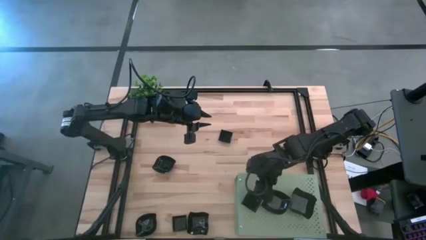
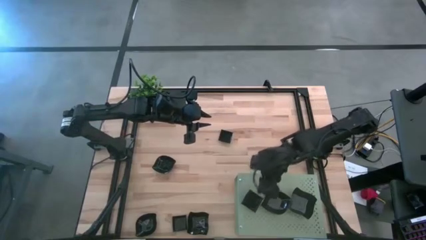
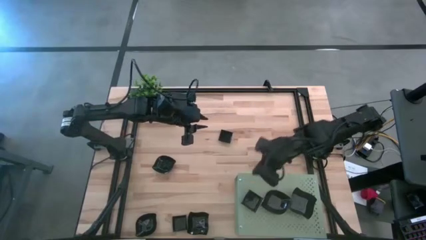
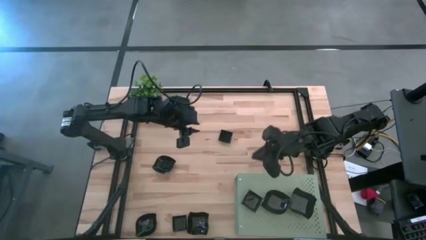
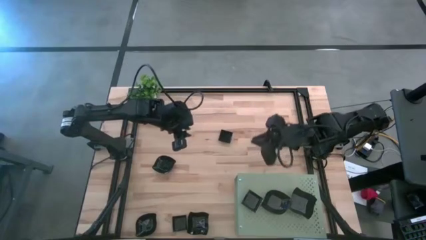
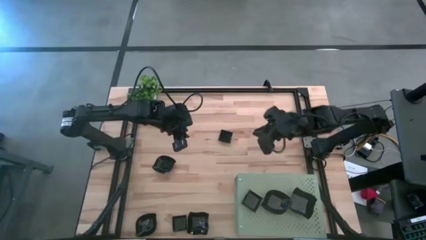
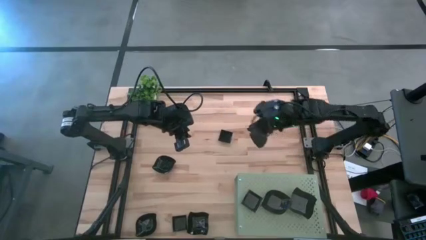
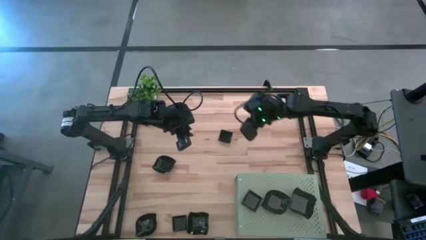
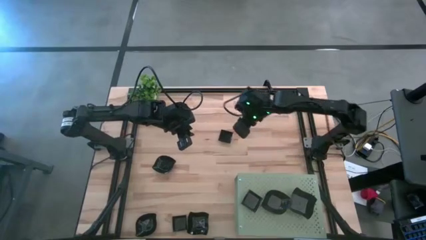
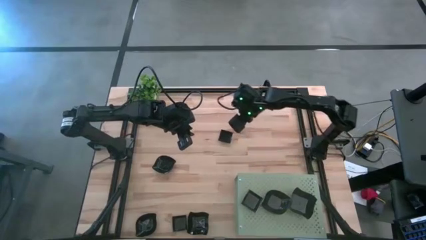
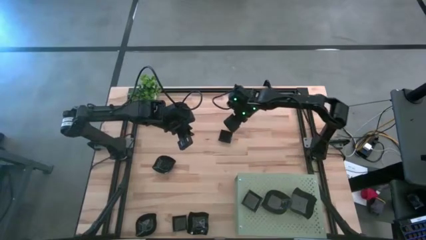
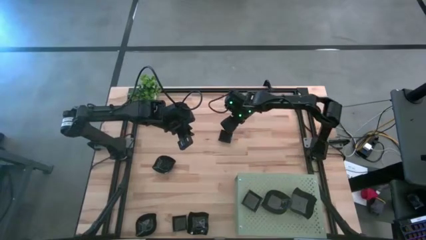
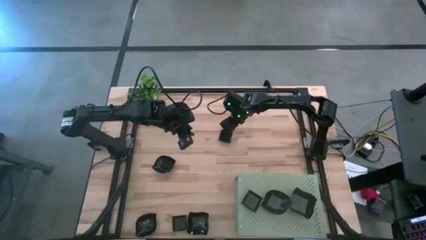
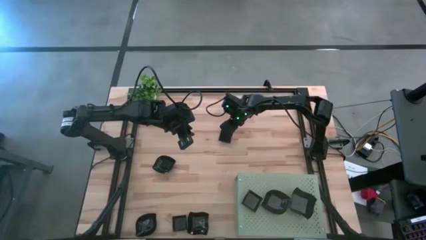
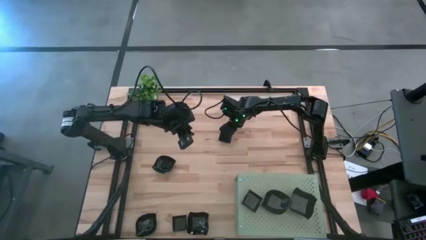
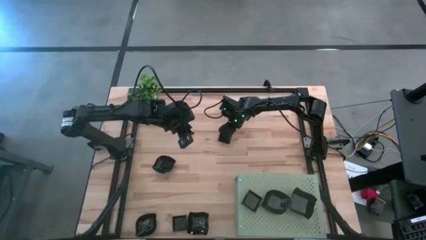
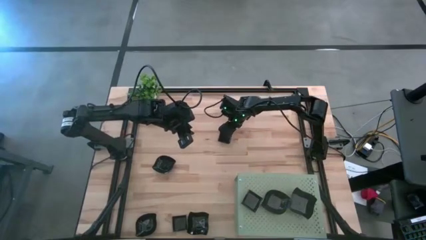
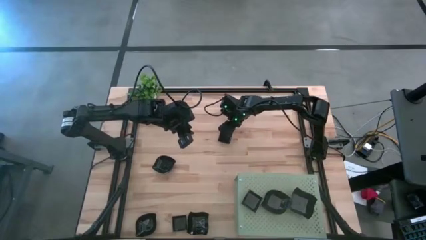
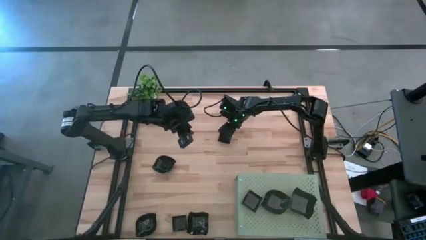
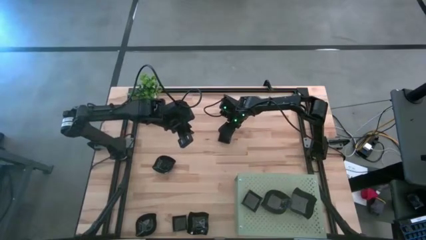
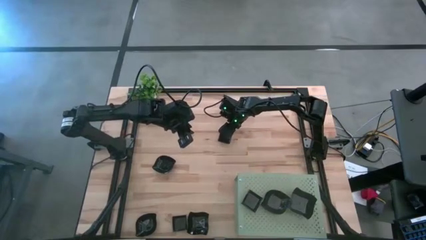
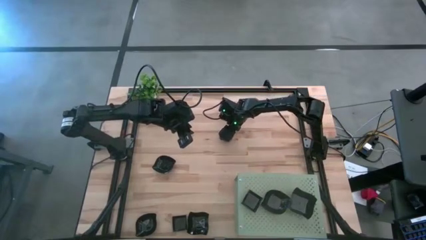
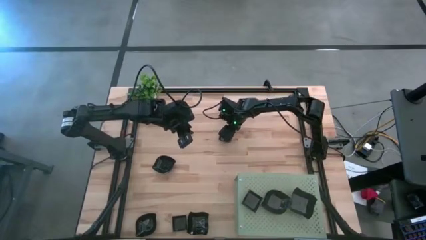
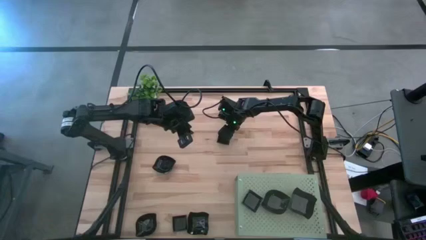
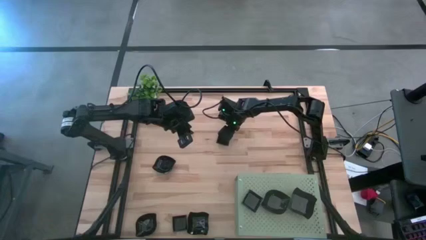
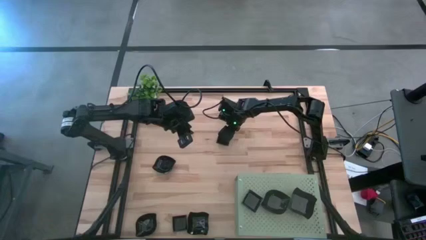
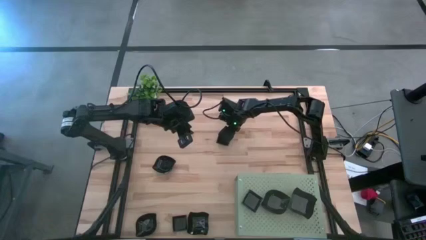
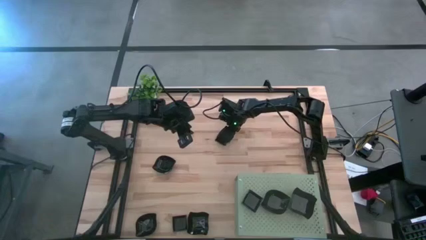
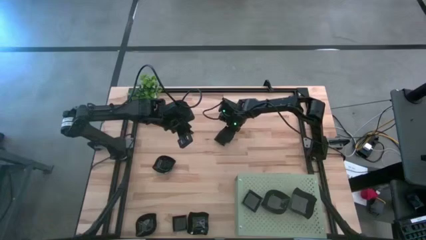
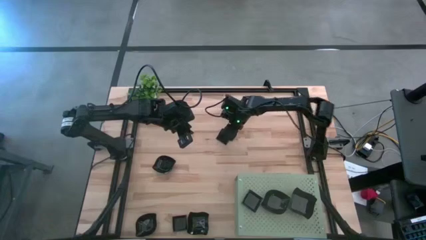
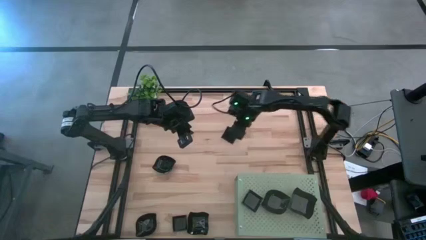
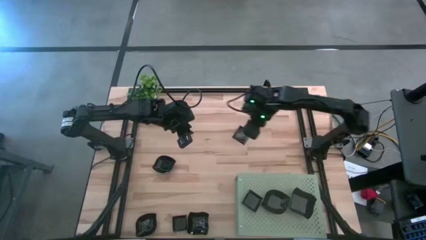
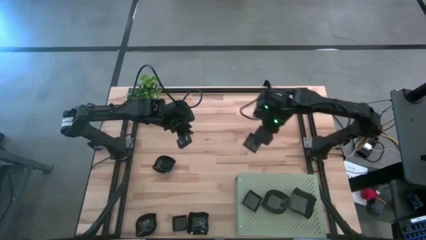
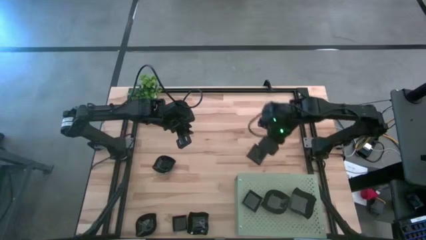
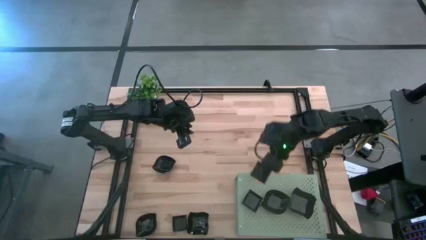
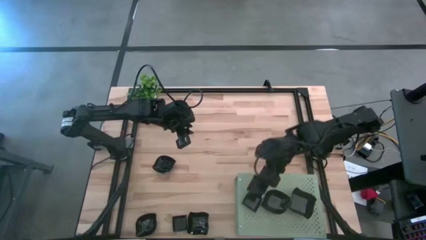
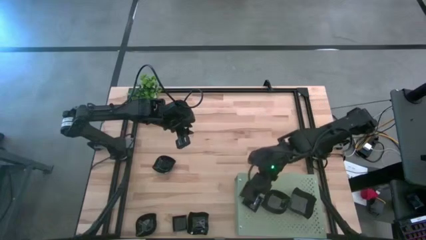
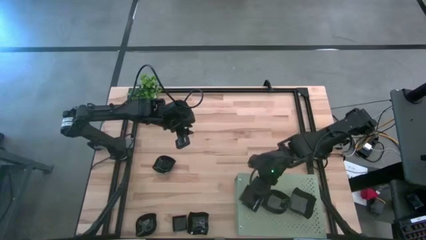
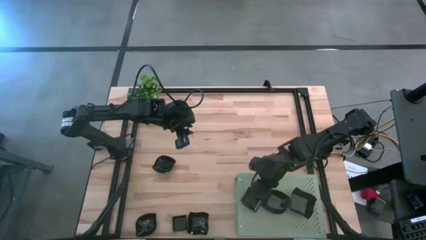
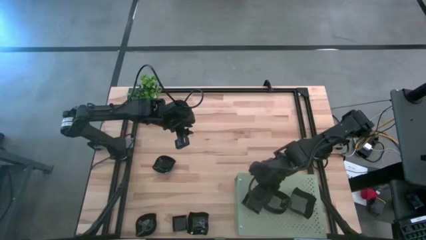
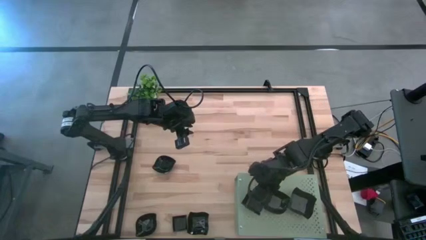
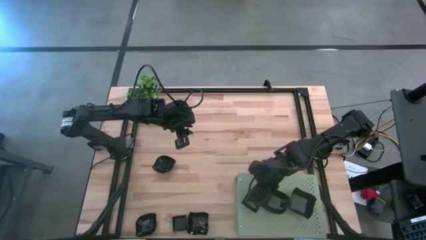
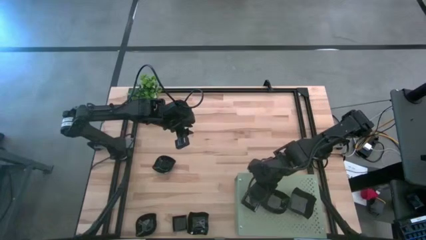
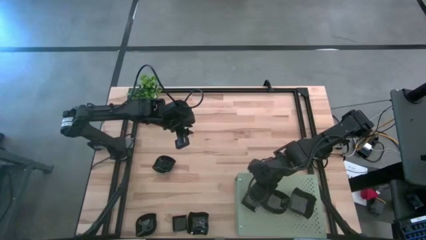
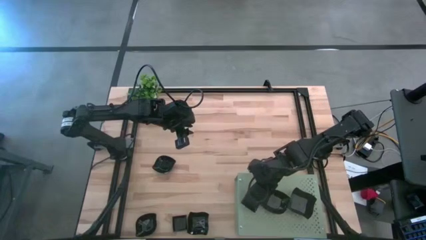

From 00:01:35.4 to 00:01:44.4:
Task: Pick & Place Mini shaped plates
Stack the square plate on the square plates on the shelf

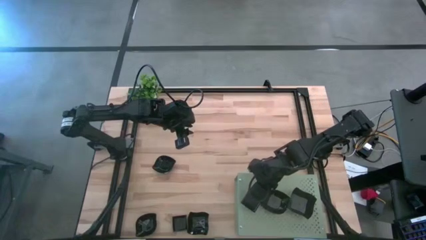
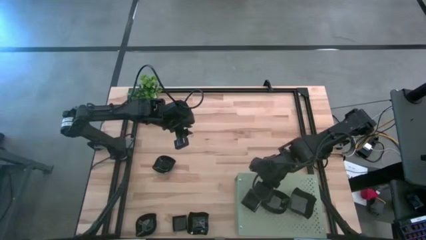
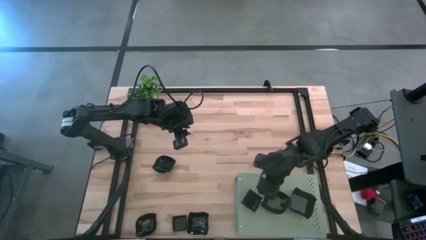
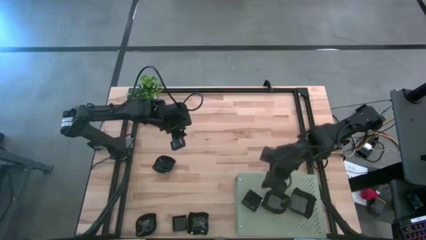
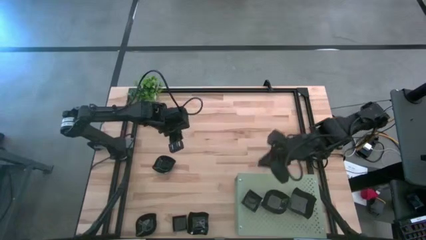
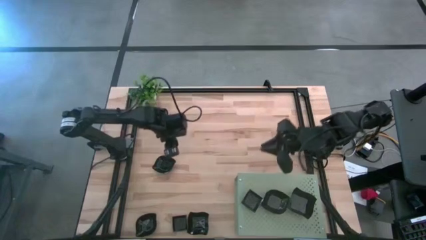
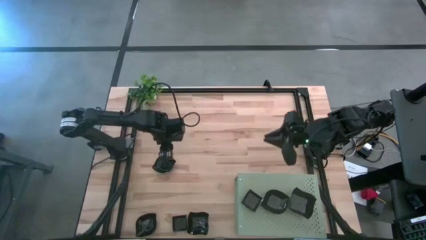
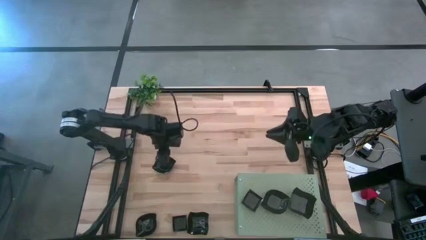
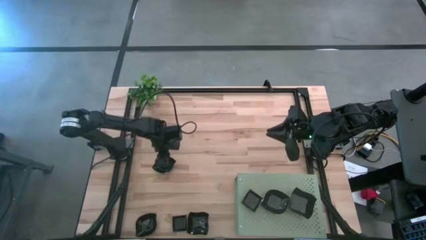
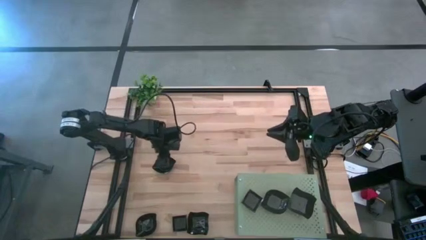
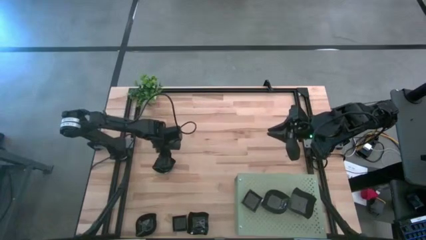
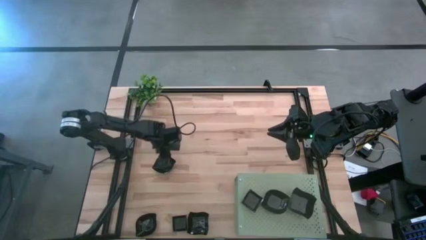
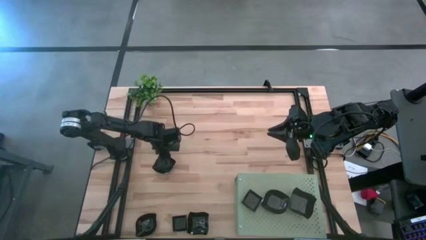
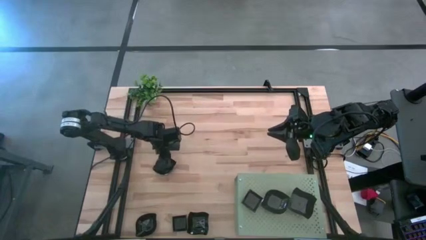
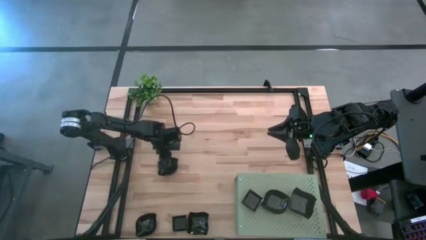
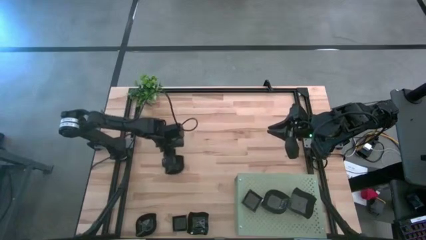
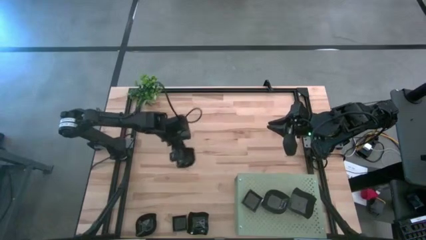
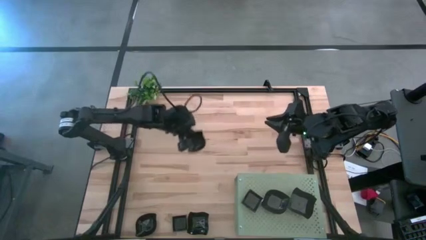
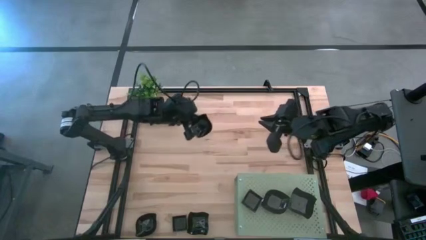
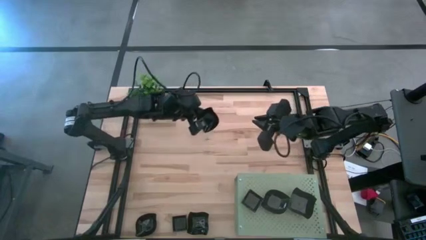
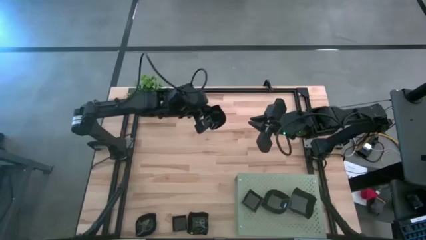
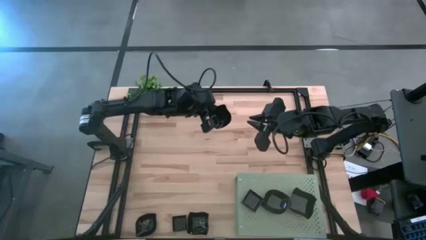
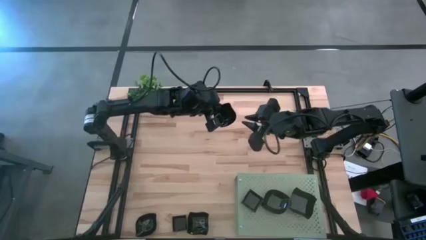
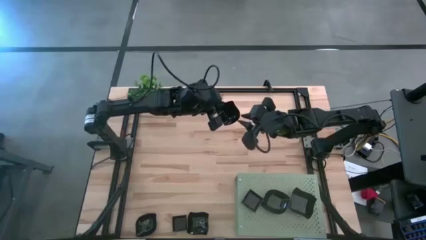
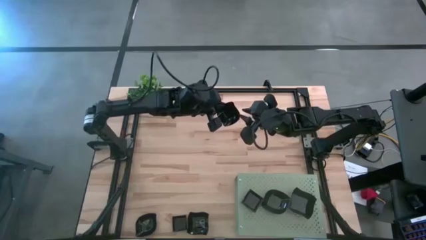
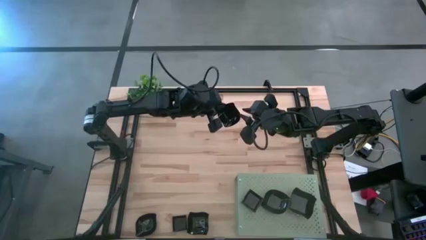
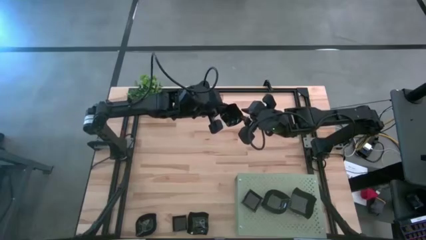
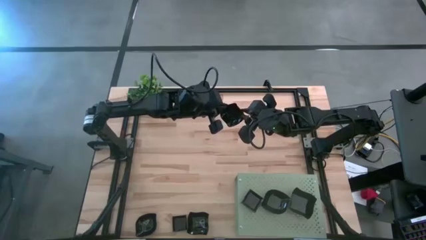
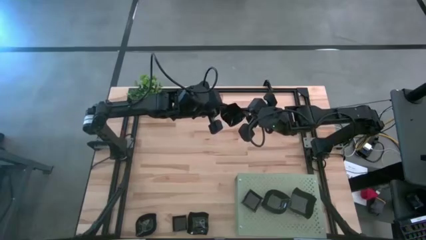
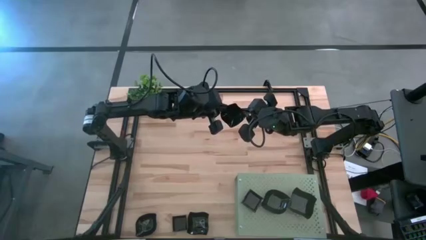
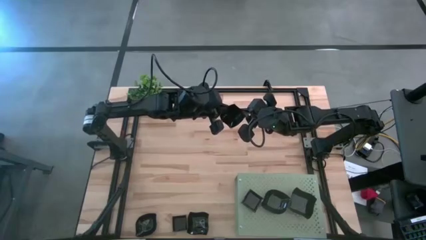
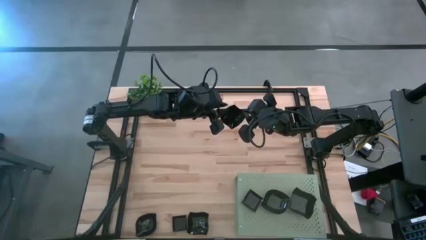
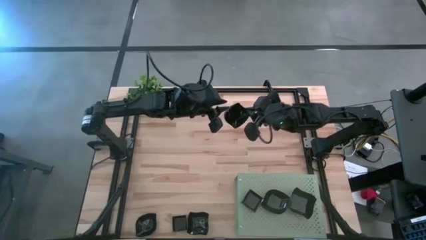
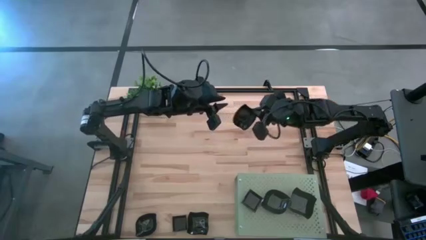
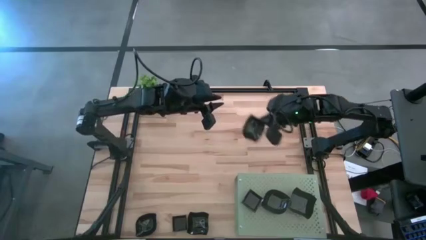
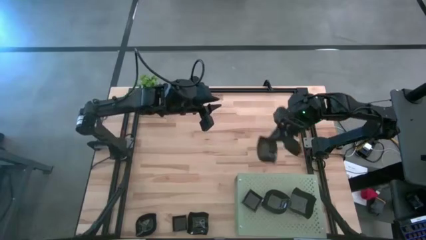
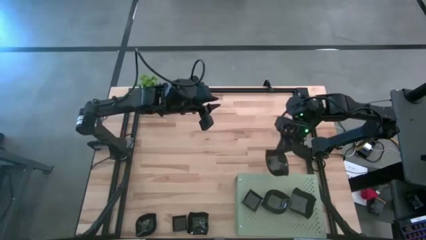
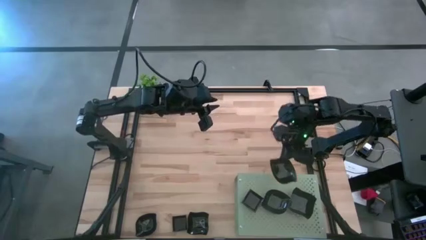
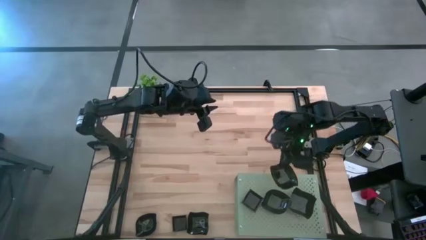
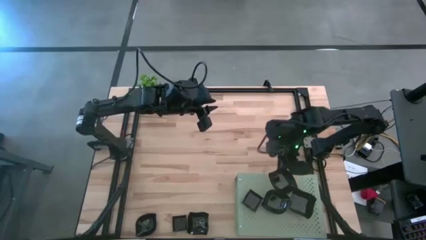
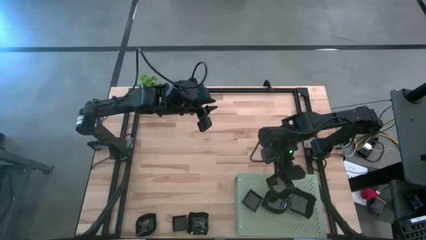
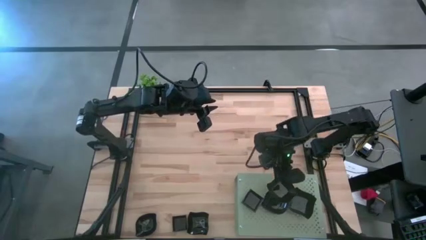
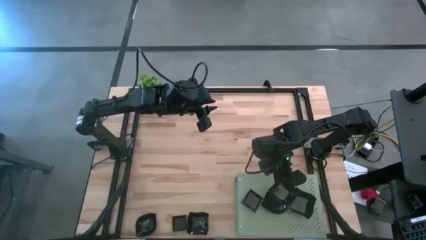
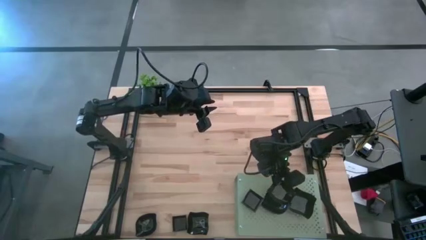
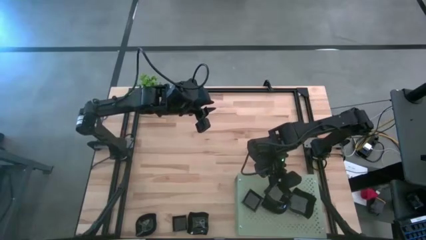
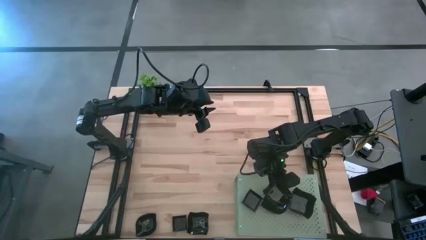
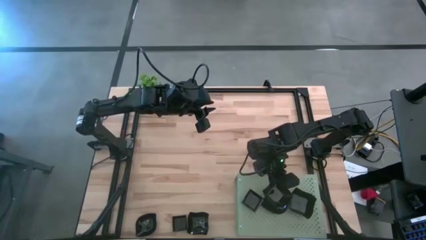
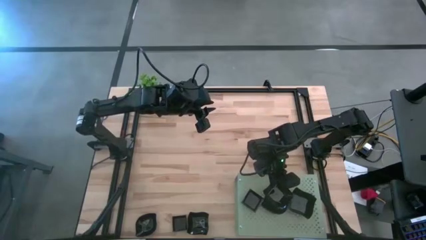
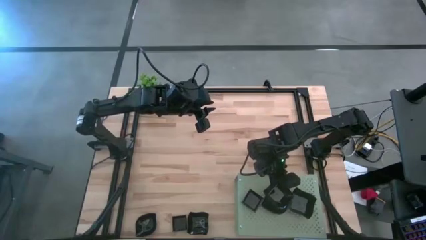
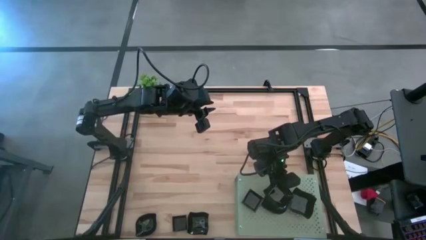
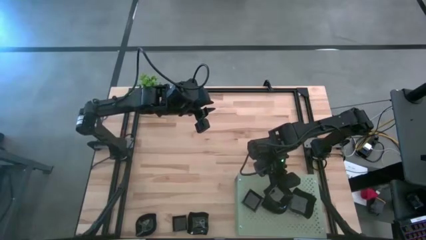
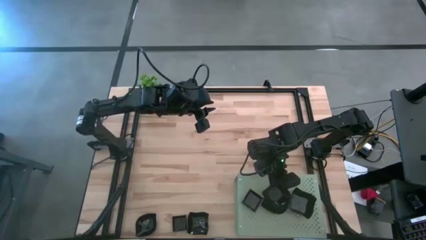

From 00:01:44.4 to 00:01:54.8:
Stack the leaf-shaped plate on the stacked leaf-shaped plates on the shelf
